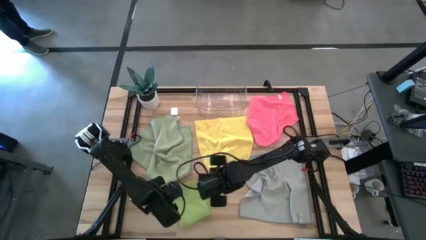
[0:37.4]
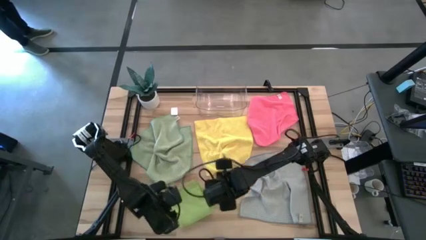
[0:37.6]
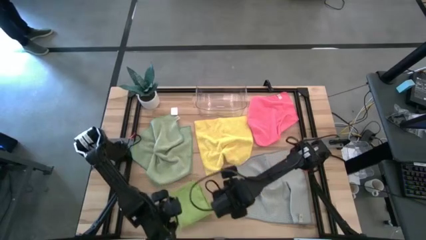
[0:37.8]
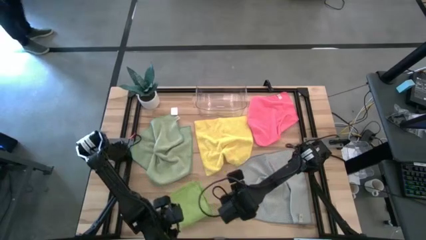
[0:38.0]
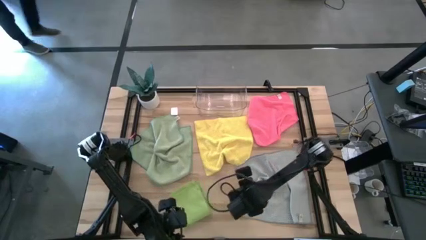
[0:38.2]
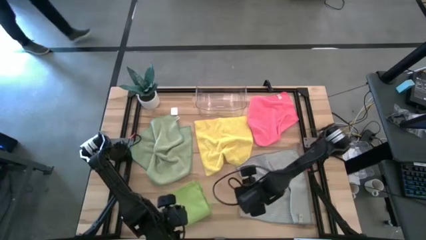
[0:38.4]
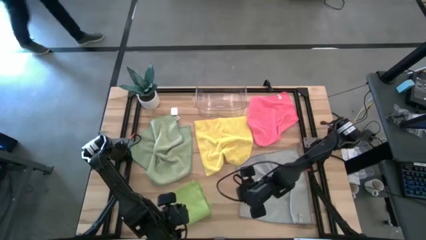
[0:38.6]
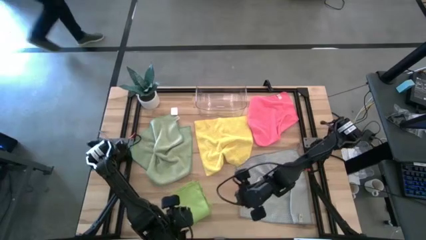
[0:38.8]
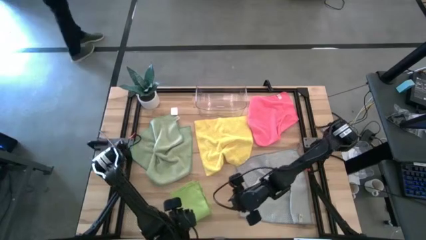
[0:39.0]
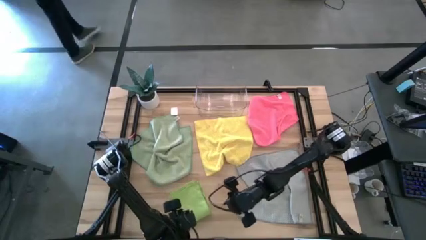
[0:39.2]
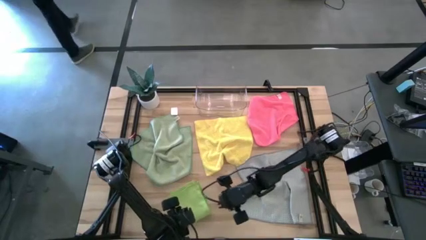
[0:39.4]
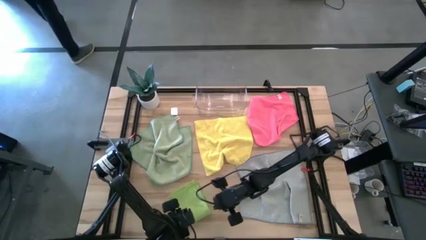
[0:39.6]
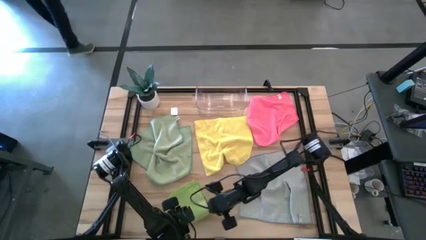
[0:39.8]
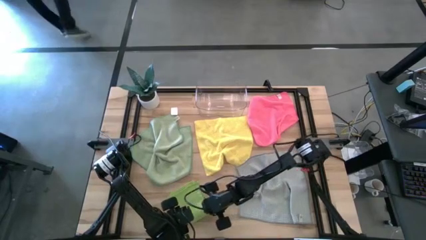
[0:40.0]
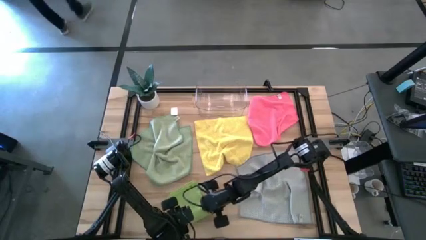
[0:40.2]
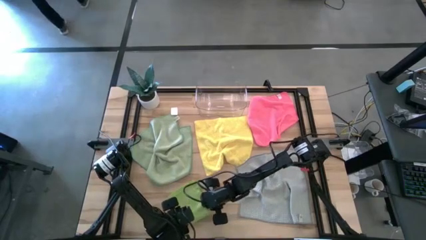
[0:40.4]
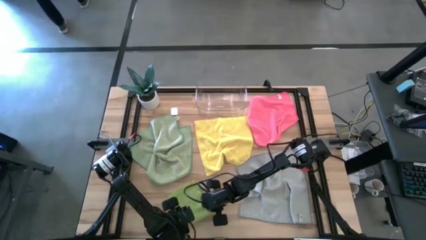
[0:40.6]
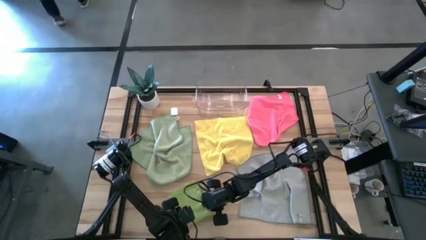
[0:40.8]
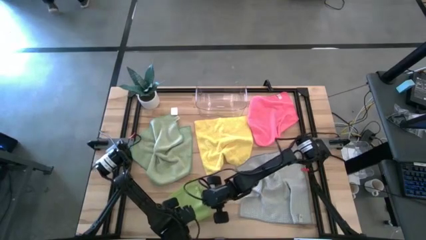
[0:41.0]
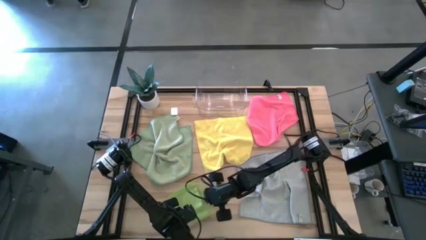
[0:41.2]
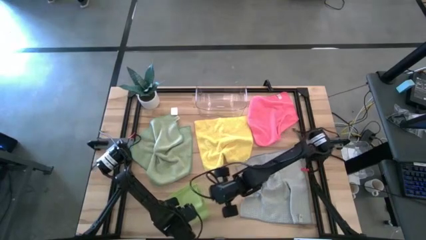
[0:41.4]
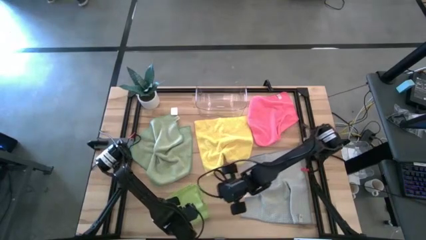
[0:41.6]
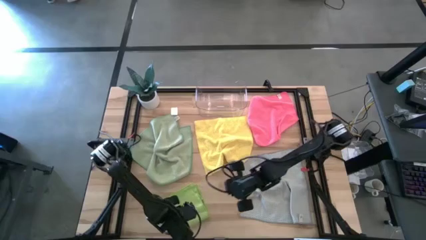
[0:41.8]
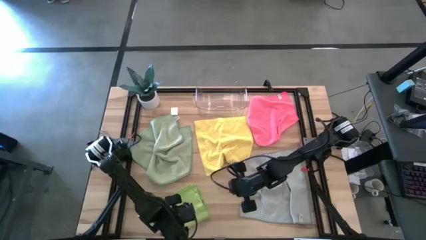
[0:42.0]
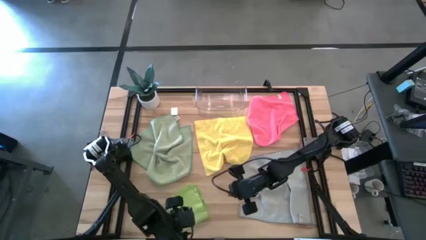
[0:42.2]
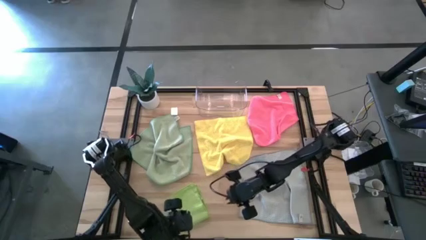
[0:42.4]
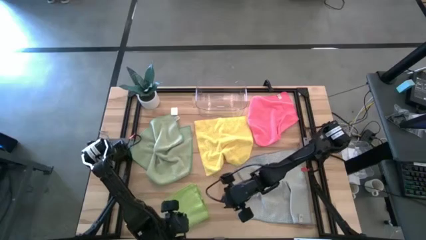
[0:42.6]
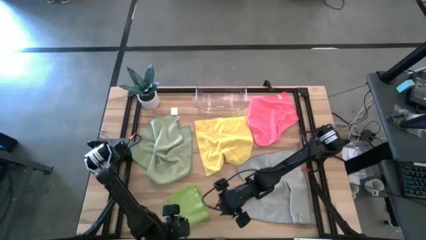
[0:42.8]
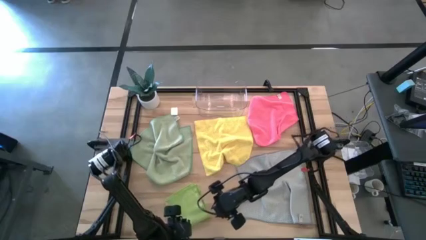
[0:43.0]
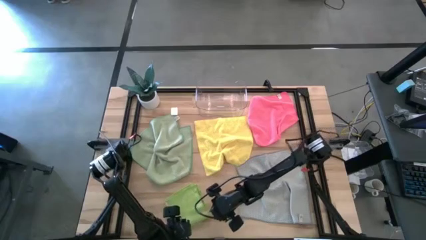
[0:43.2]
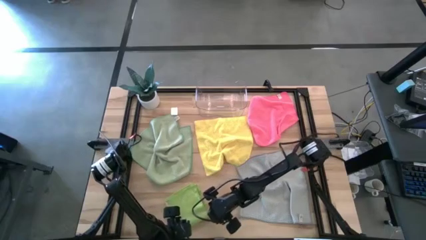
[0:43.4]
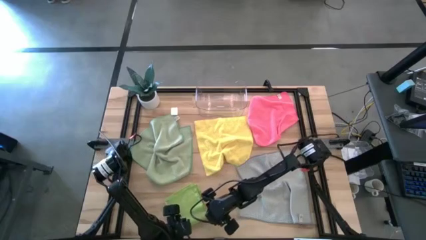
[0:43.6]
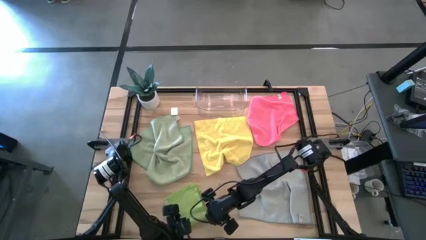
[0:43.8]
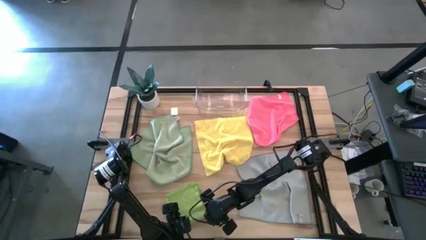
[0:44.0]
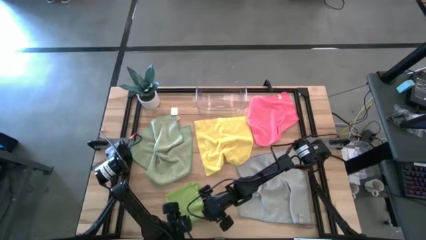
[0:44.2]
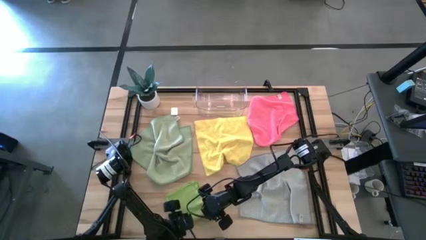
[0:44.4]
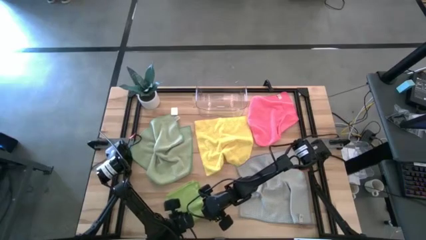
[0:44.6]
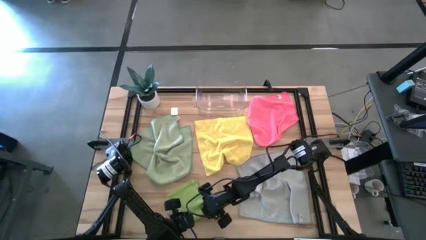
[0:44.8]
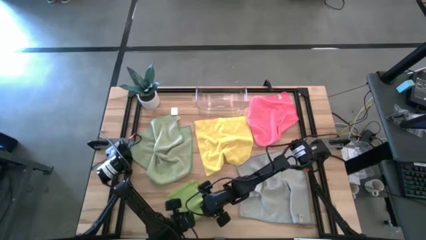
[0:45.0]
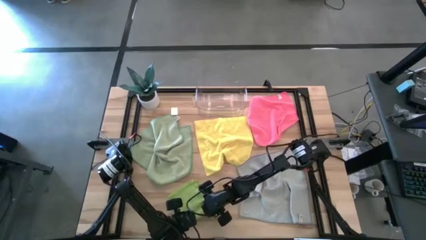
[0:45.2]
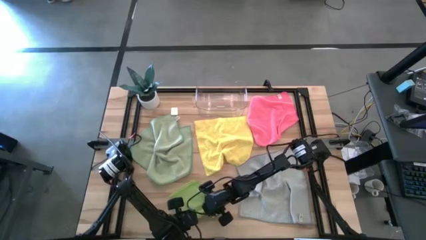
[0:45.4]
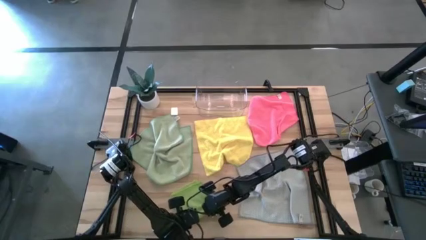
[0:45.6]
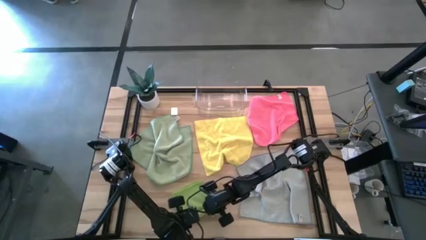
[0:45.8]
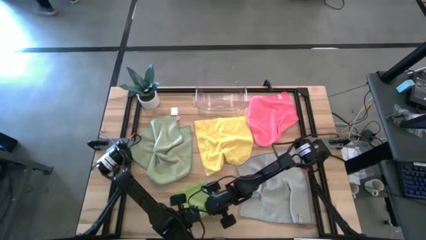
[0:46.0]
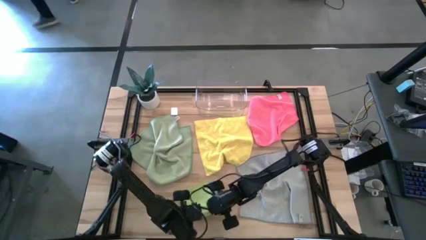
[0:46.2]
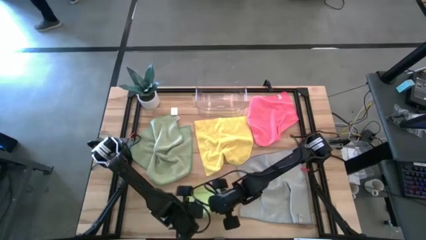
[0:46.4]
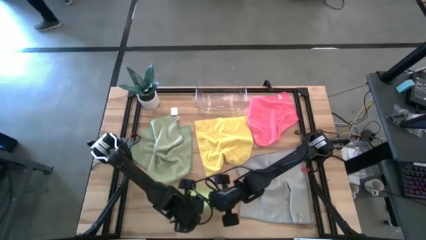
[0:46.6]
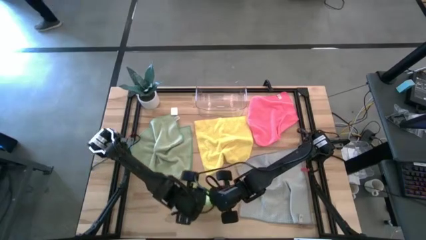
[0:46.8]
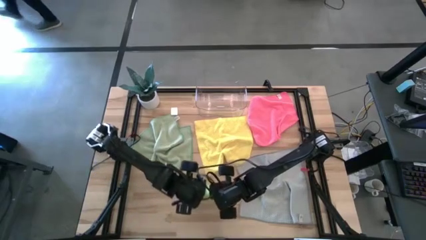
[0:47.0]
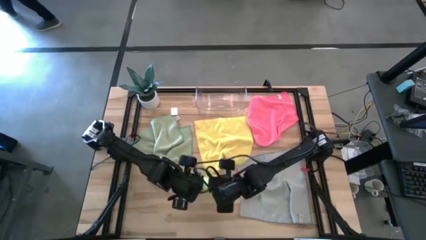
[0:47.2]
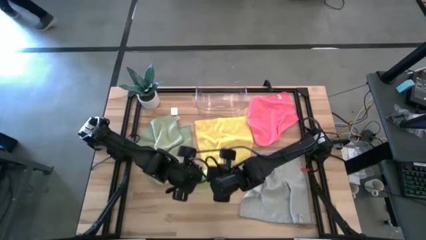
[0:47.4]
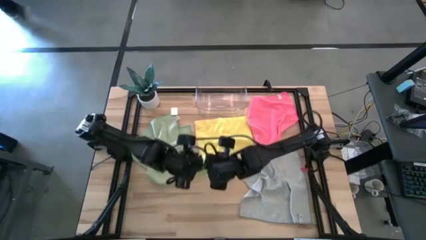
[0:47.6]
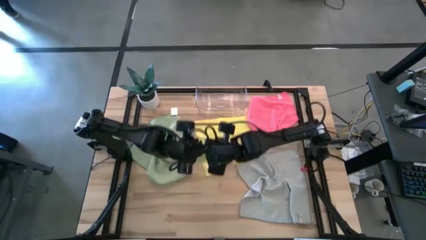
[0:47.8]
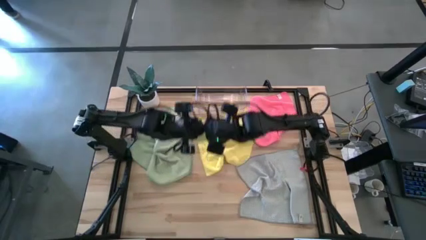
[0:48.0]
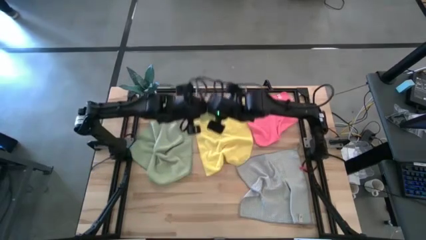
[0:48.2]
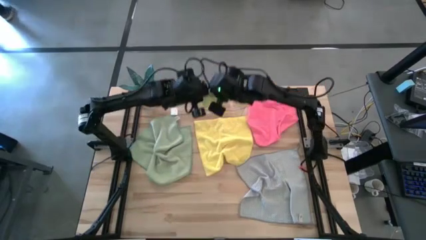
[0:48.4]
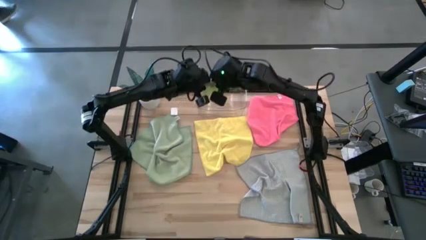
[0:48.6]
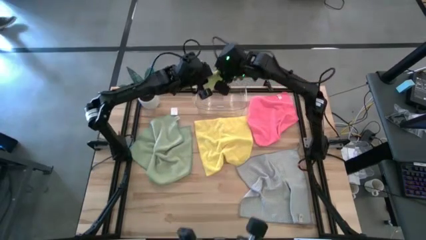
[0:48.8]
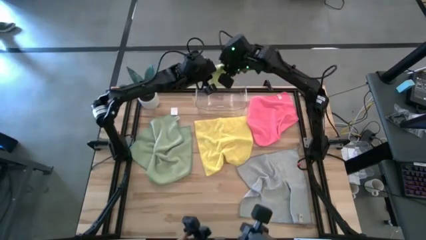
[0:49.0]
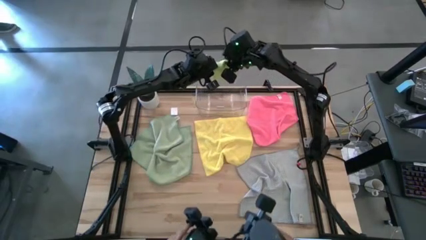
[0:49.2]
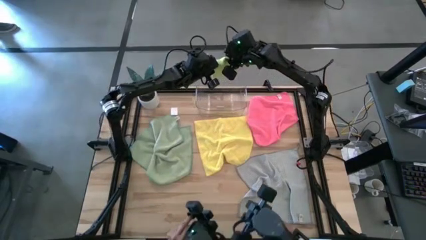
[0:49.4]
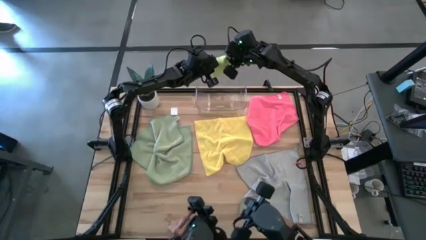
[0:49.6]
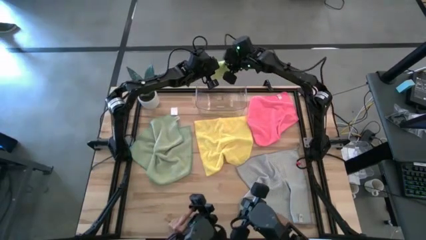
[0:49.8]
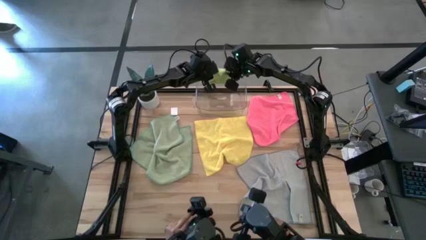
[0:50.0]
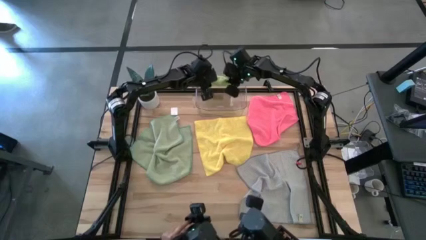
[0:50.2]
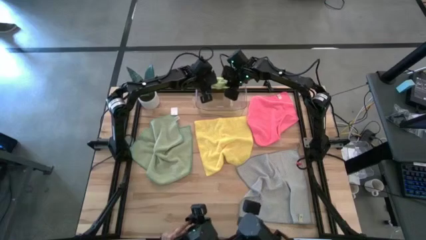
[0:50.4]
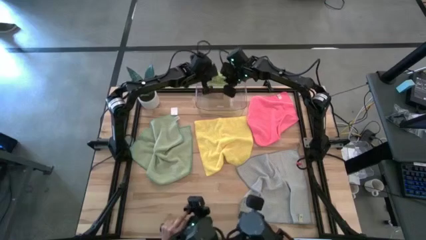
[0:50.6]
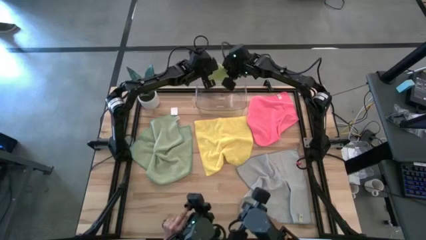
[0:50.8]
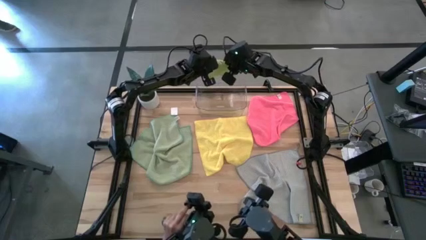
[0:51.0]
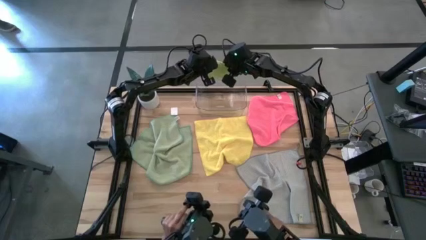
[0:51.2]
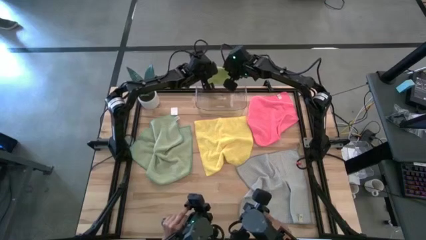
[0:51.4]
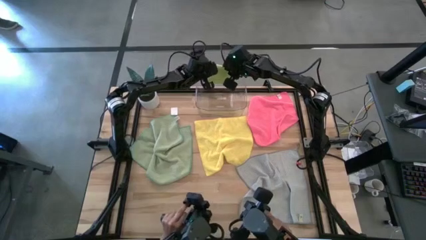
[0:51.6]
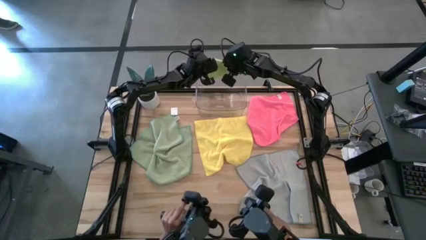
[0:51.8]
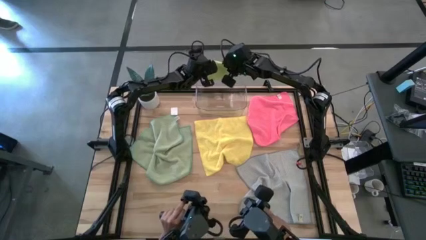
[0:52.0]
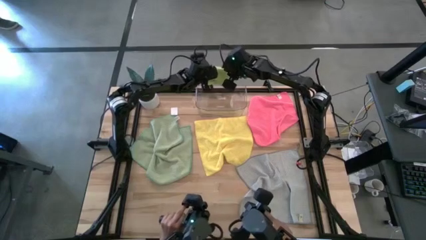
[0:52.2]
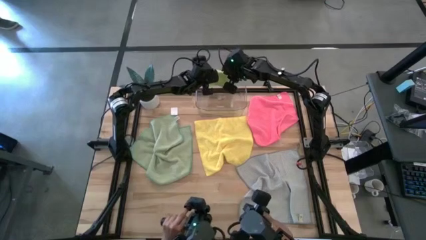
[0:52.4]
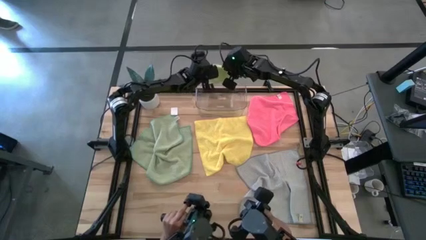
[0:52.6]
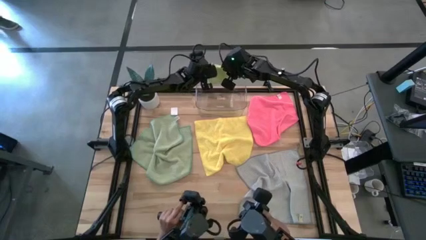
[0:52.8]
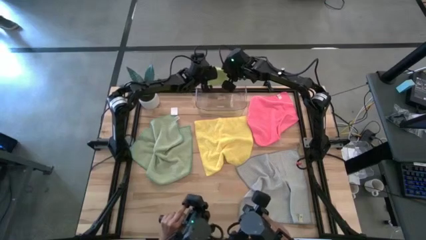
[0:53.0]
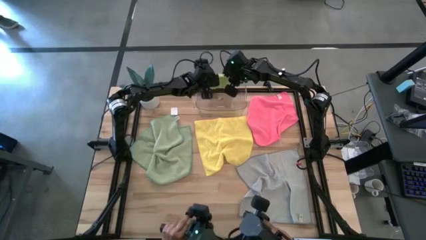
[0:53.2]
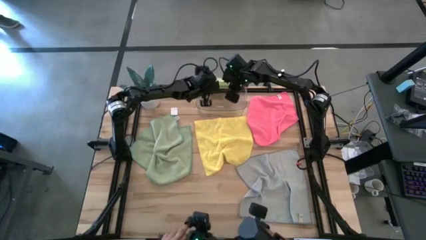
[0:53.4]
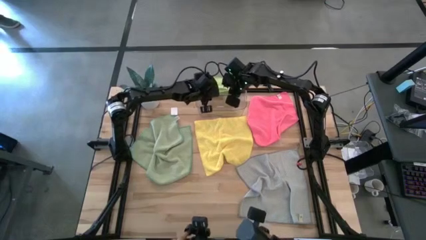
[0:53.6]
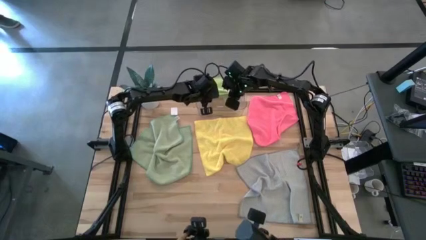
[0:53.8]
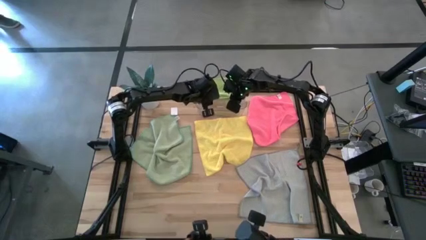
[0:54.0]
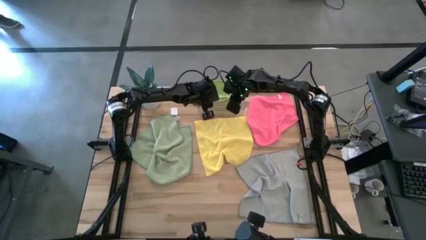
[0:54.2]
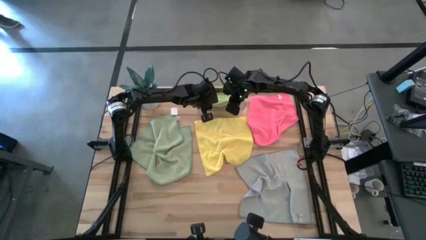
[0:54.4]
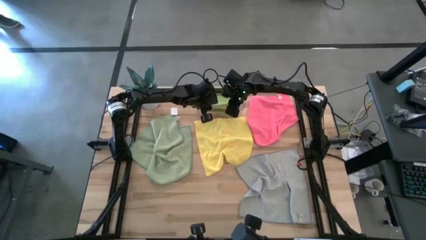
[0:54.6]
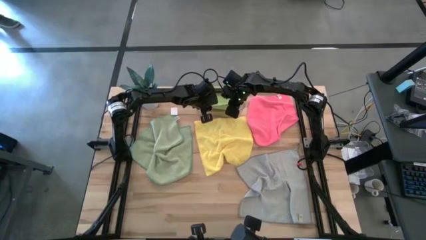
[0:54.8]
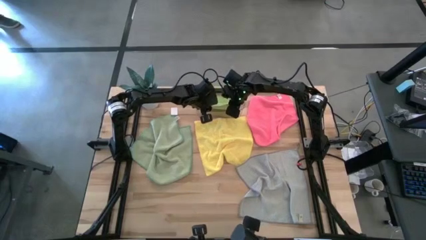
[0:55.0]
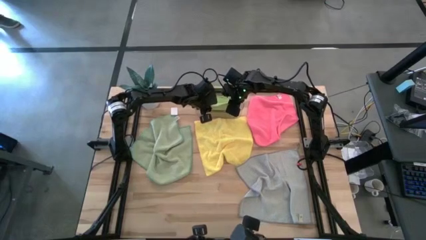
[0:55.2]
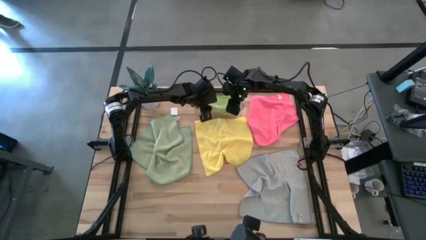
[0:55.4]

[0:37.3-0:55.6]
Task: Fold microfiber towels
Put the folded green microfiber cloth into the transparent bin
